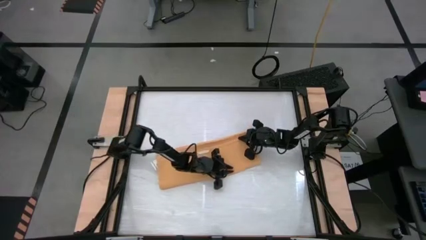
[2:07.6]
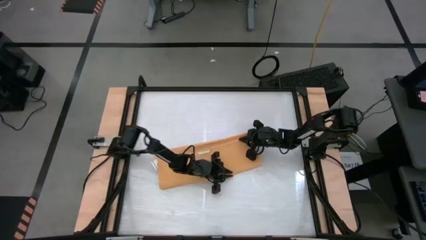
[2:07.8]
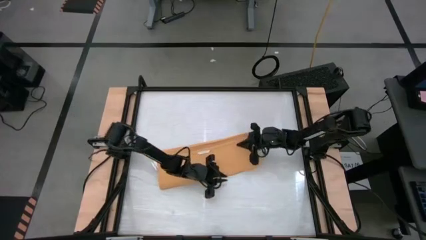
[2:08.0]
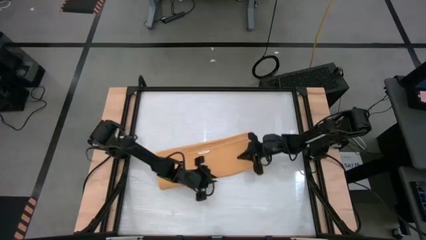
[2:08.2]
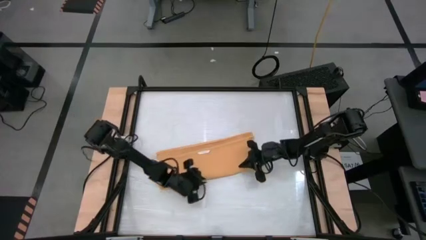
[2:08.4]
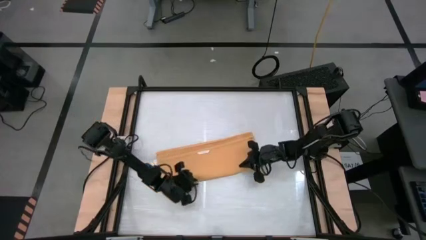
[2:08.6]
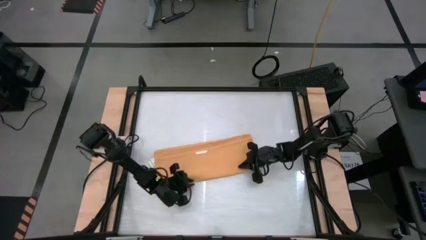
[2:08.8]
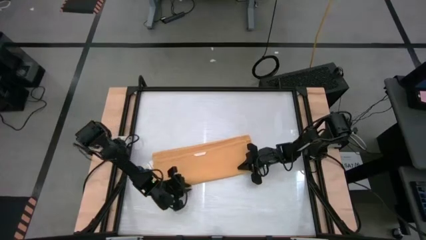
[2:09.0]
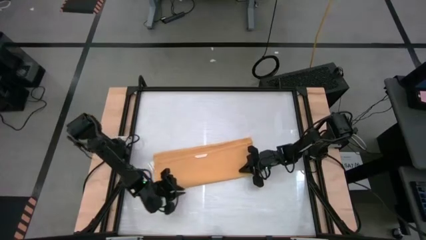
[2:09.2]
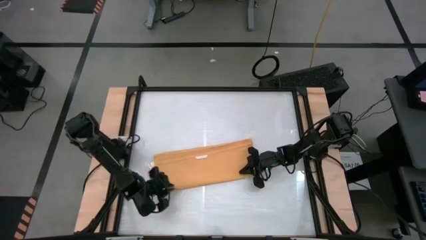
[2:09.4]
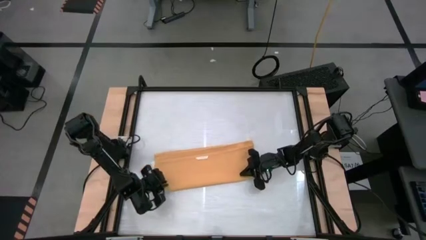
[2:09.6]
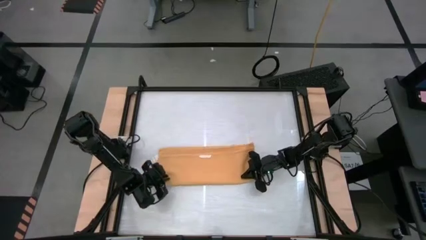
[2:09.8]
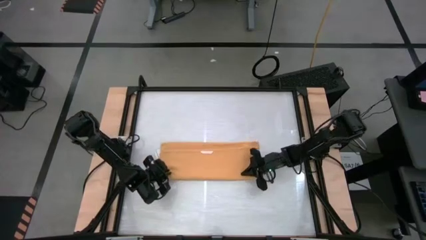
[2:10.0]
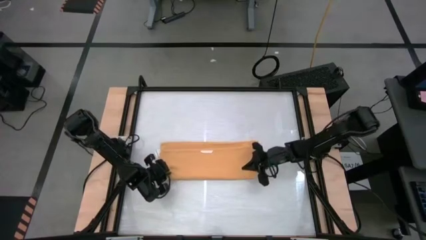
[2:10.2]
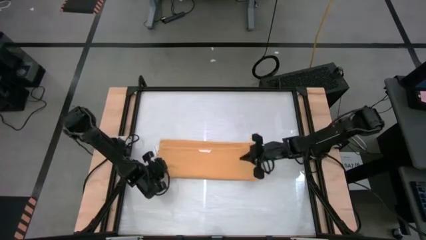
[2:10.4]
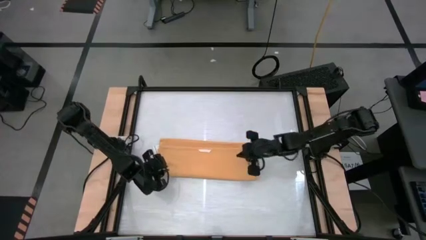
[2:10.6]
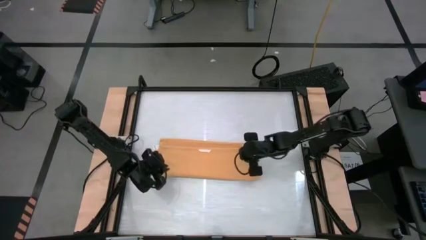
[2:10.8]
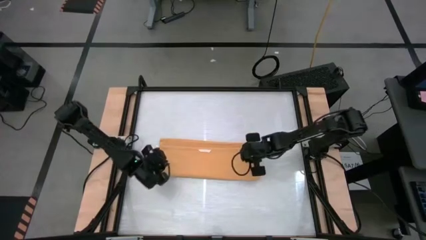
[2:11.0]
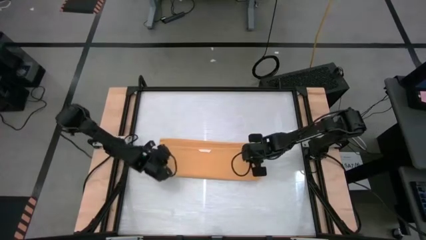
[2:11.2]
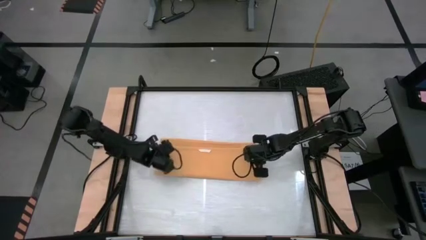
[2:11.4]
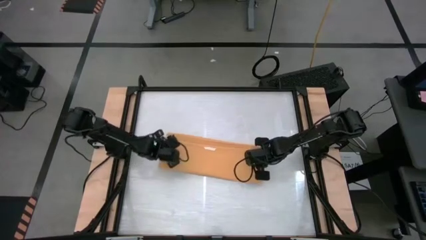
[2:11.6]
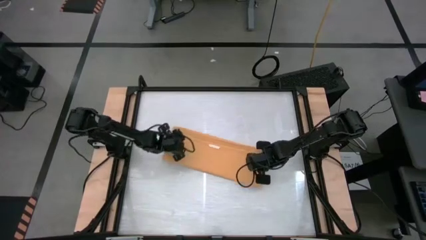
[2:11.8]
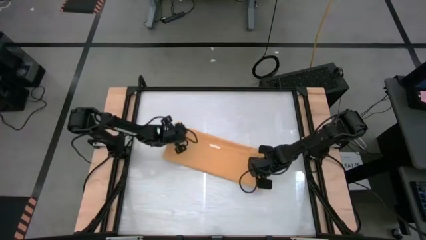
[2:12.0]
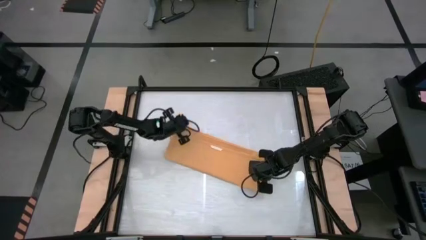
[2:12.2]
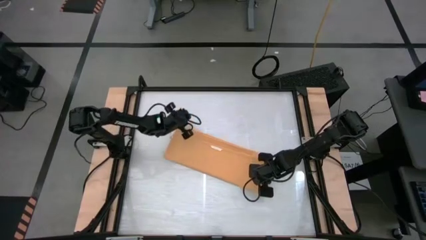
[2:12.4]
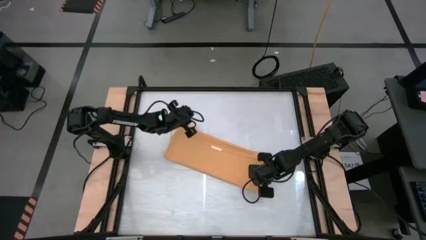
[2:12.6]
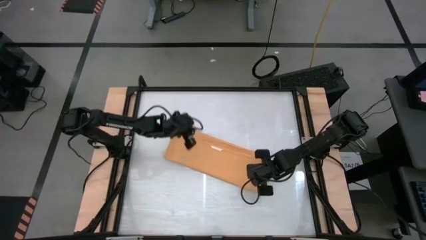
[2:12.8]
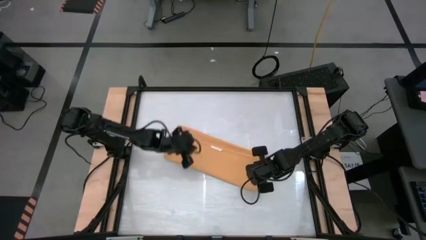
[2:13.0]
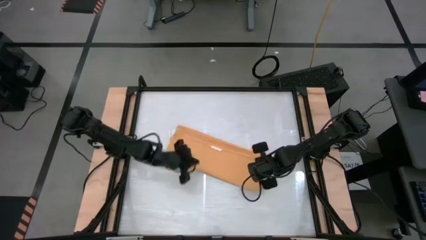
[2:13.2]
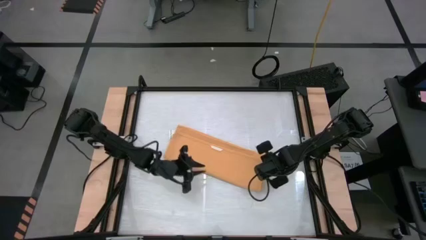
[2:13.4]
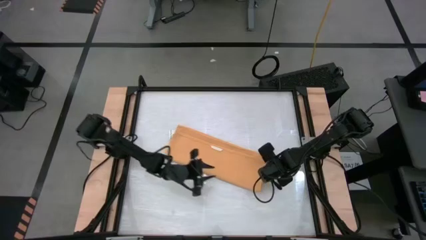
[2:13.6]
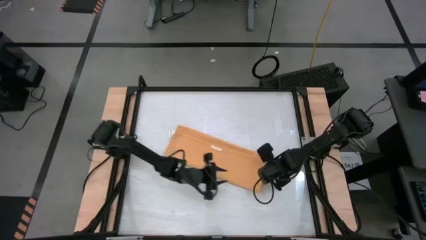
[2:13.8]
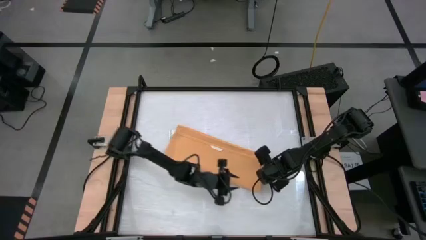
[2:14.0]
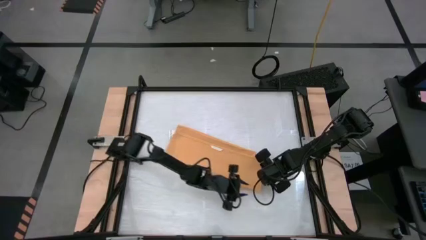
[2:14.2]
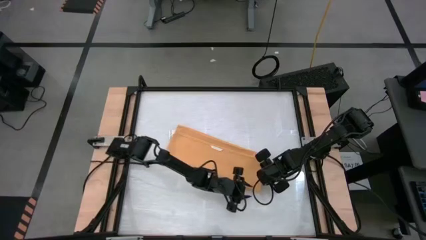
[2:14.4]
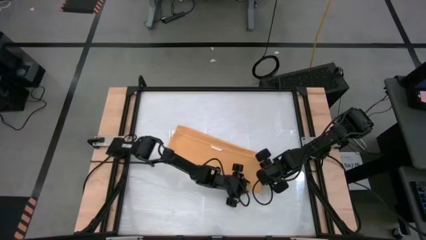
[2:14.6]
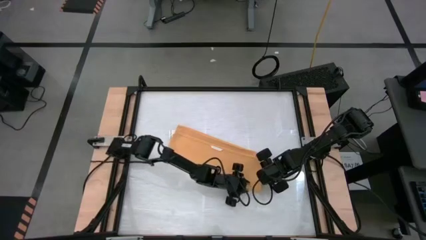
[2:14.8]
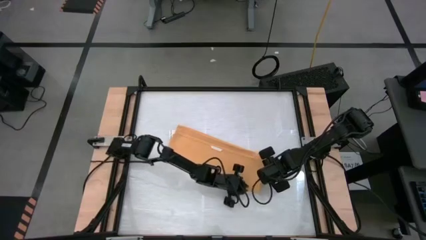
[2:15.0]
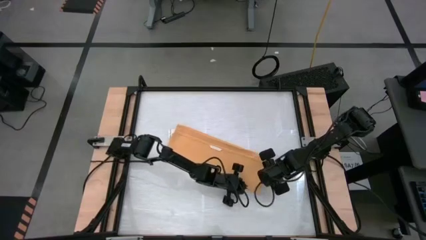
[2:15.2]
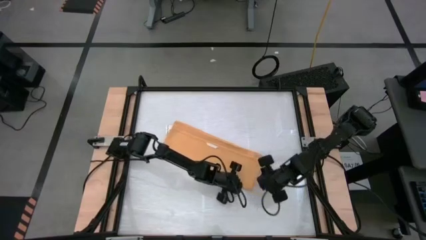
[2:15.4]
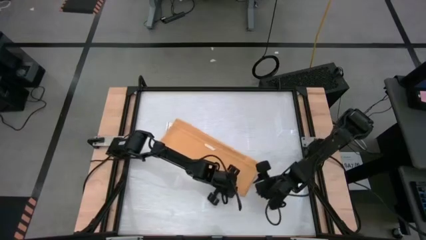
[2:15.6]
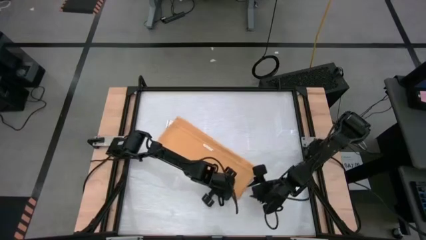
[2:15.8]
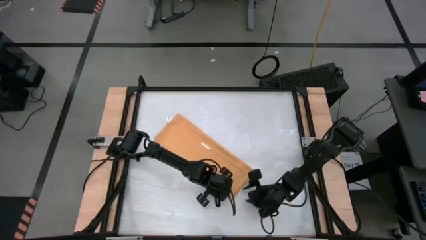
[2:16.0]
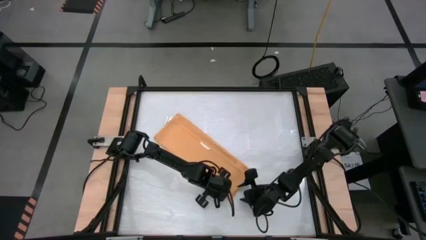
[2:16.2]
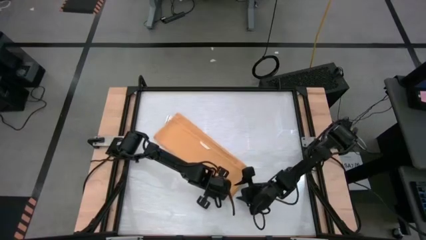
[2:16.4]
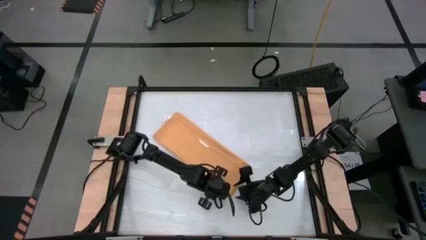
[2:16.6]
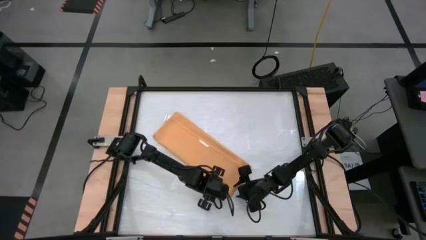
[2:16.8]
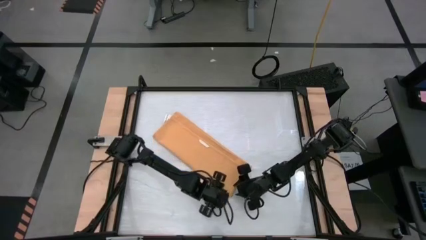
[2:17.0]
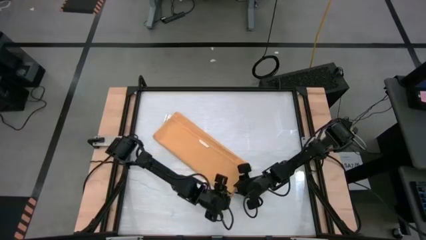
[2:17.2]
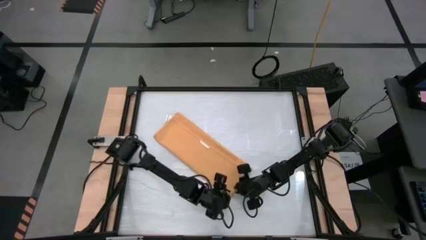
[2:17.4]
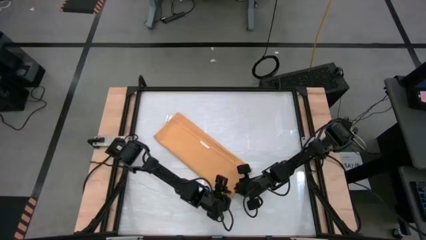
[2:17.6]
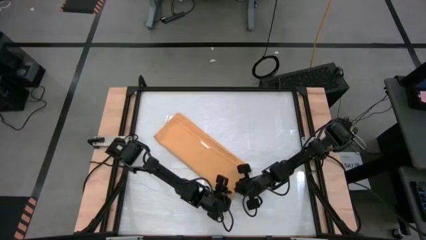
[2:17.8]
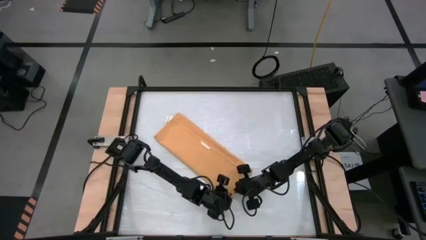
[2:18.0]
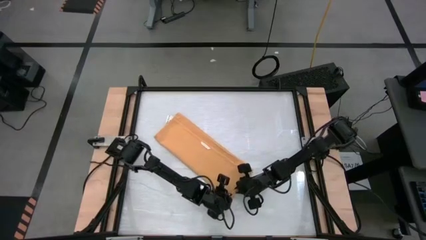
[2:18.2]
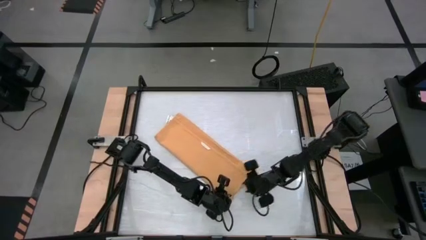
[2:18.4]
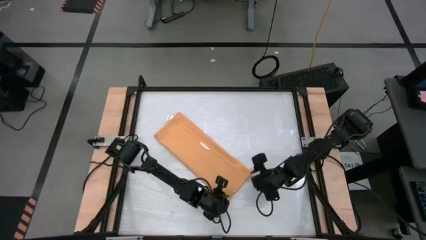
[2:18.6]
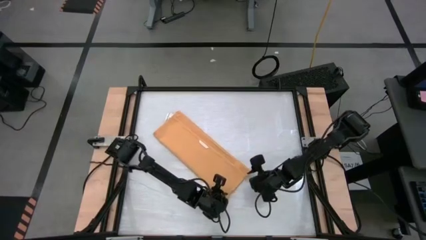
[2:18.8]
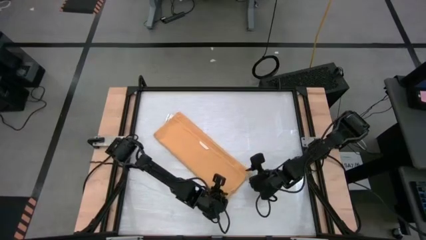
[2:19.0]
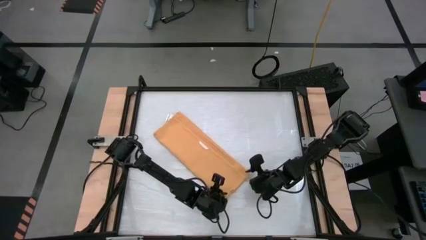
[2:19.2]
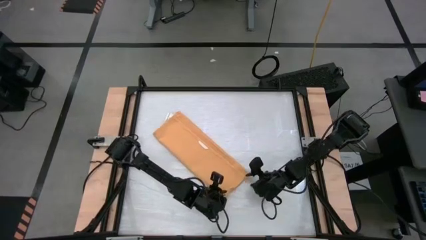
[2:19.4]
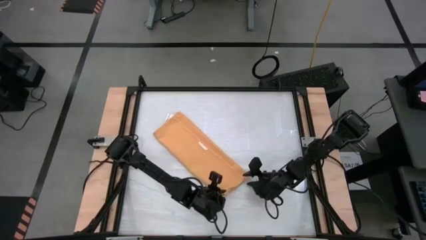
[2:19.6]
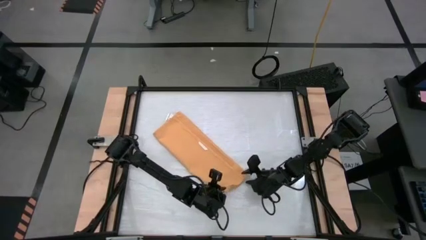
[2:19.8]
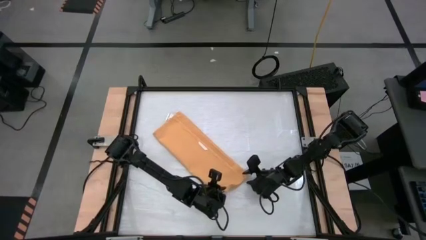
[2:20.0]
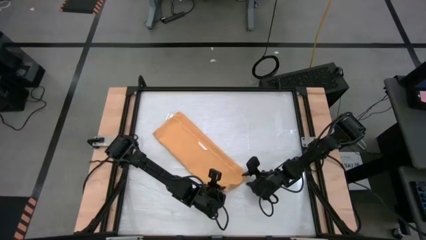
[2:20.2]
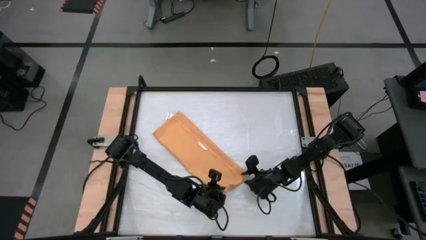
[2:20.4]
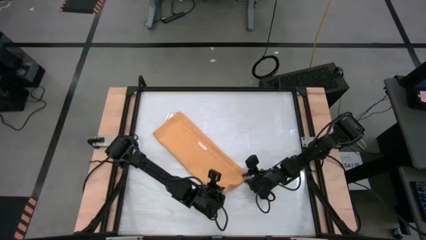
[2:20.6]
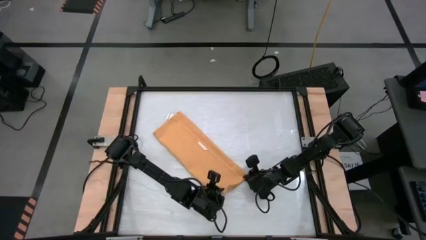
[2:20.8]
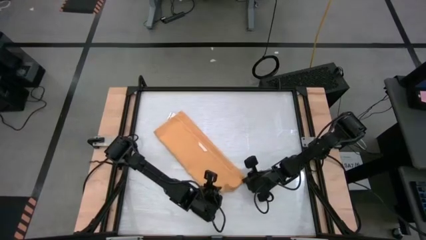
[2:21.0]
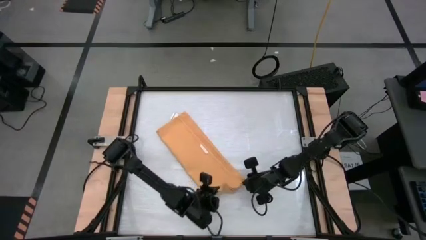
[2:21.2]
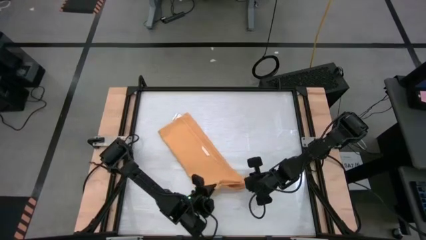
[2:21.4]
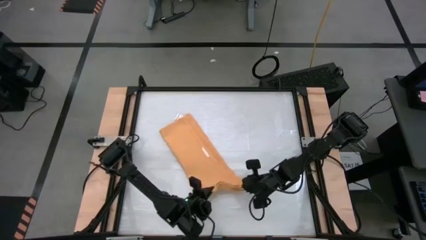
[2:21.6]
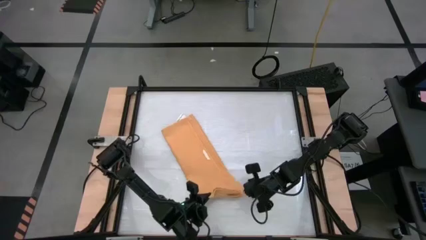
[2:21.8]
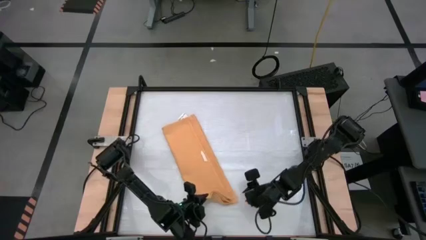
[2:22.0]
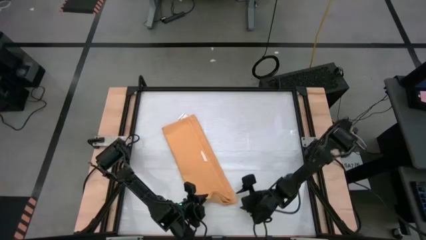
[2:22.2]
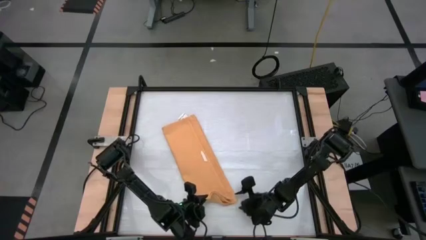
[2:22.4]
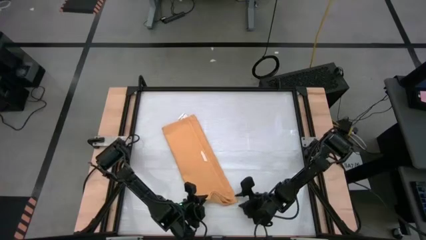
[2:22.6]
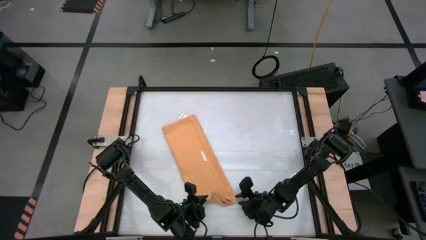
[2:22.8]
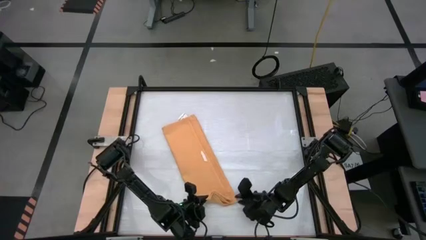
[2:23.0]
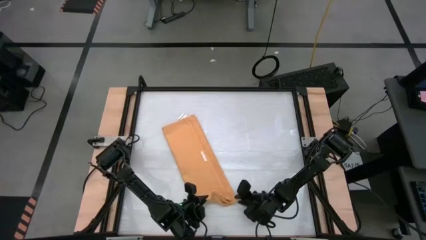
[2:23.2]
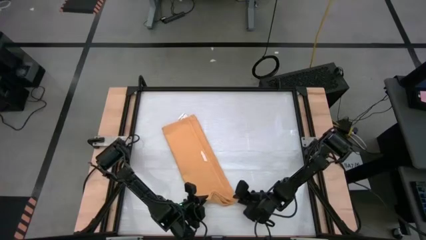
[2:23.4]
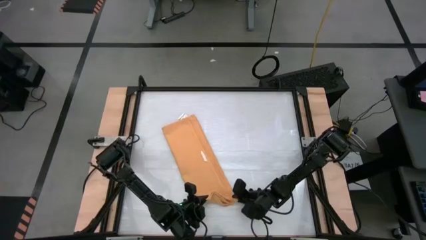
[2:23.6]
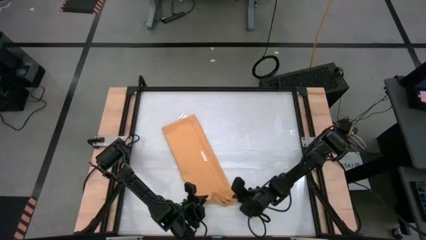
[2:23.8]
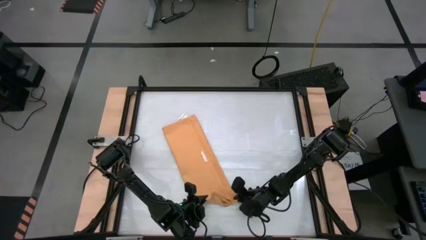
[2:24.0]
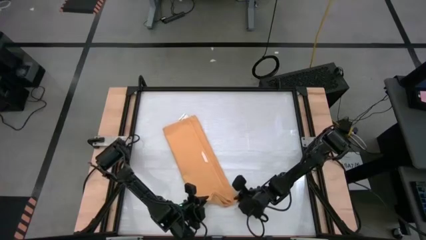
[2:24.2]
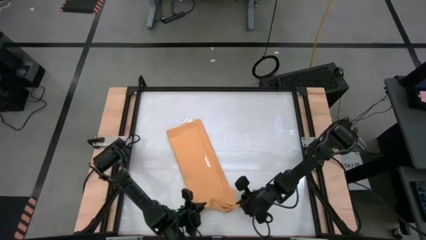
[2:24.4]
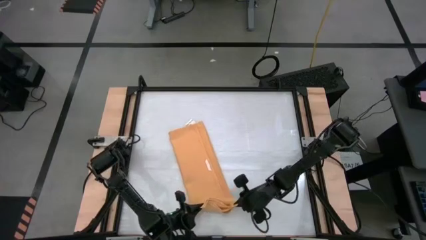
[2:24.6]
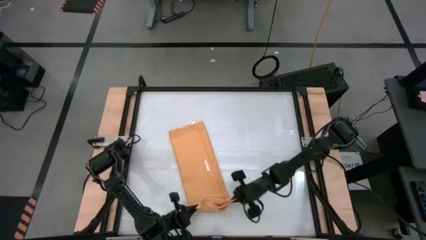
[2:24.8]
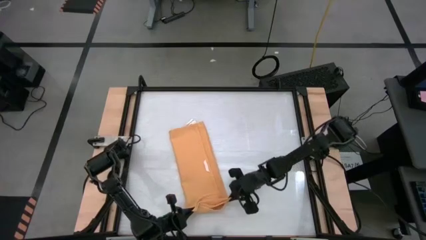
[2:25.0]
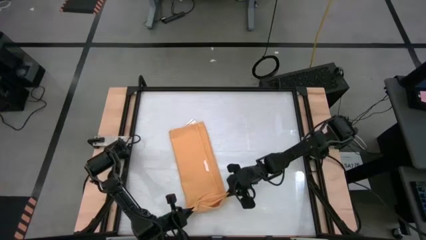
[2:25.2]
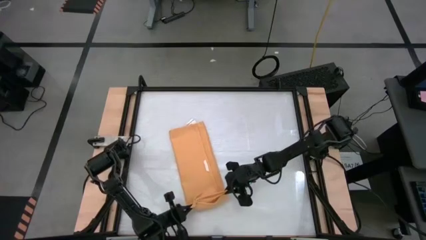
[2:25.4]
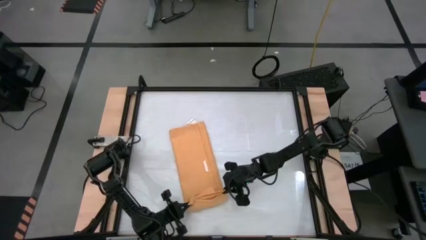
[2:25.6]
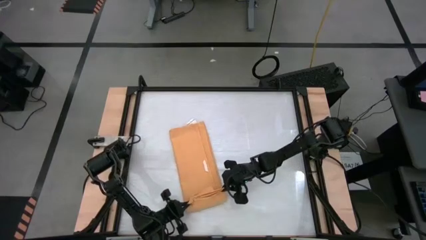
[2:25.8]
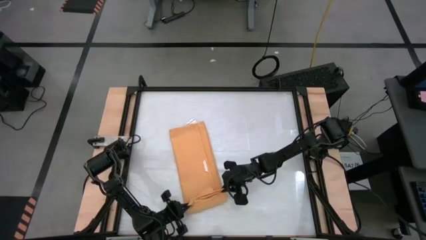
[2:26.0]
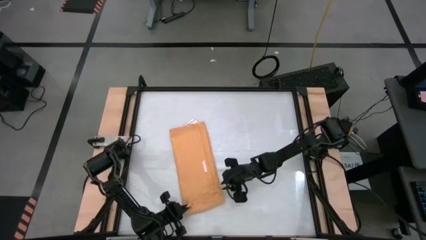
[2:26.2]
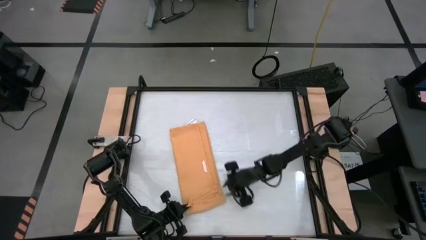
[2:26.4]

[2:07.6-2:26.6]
Task: Roll towel
Roll the yellow towel
